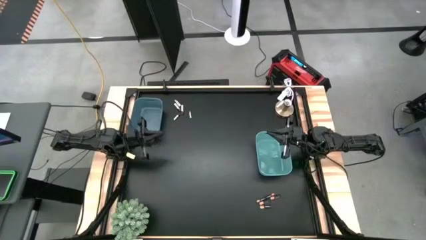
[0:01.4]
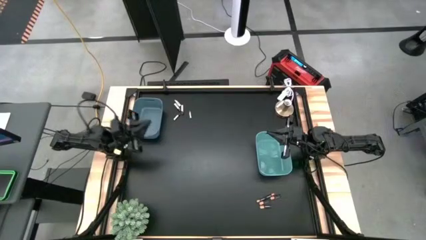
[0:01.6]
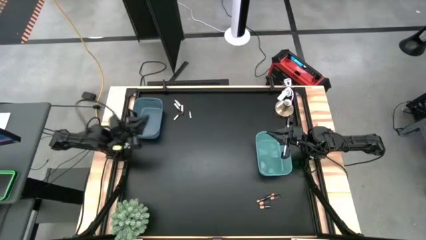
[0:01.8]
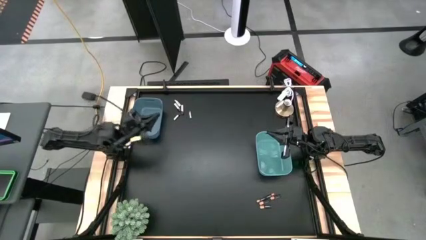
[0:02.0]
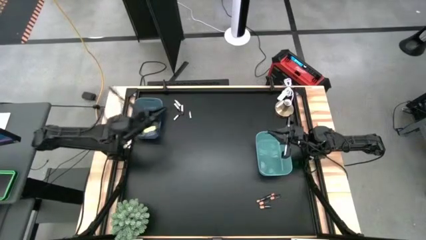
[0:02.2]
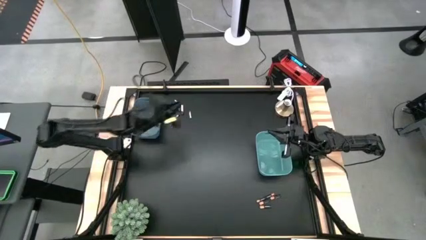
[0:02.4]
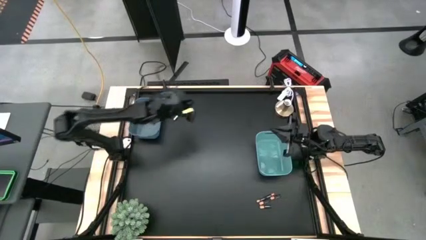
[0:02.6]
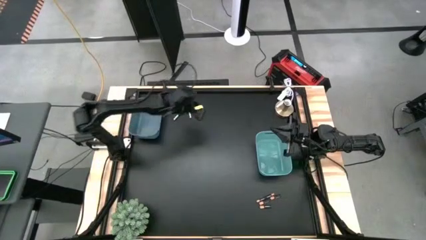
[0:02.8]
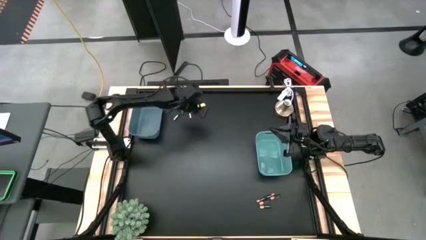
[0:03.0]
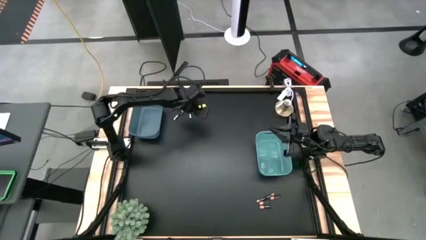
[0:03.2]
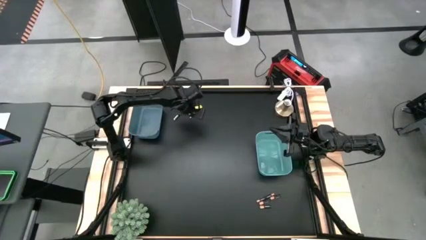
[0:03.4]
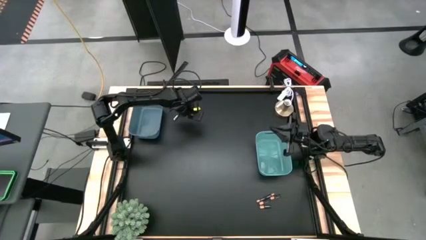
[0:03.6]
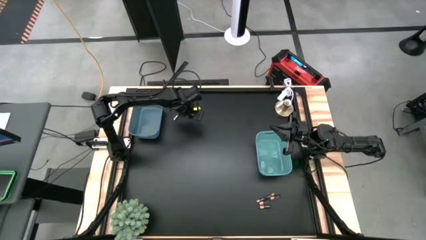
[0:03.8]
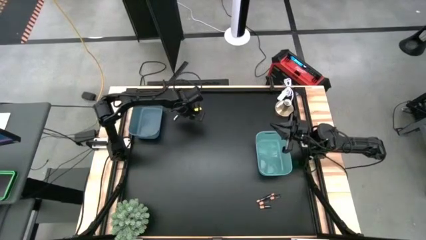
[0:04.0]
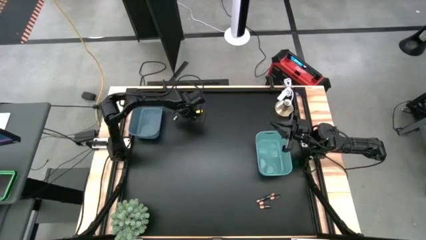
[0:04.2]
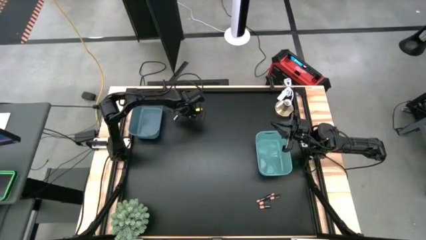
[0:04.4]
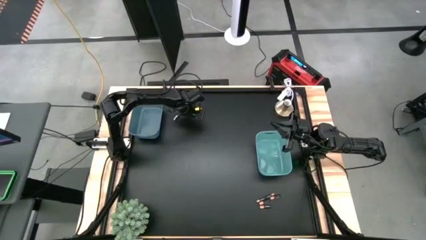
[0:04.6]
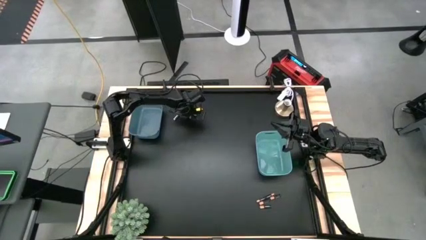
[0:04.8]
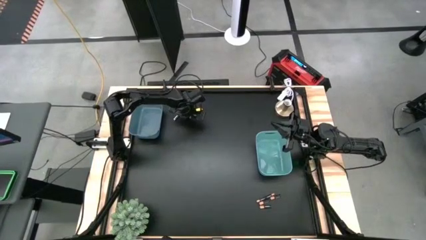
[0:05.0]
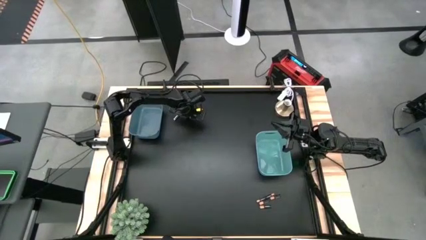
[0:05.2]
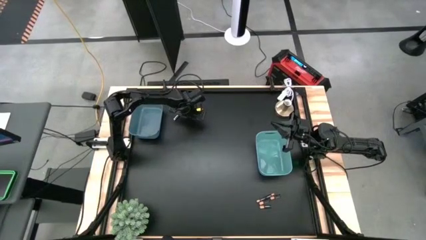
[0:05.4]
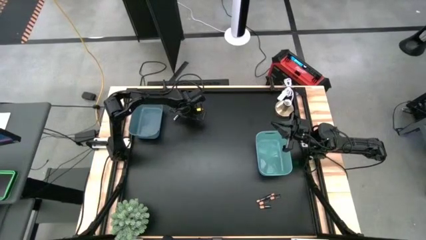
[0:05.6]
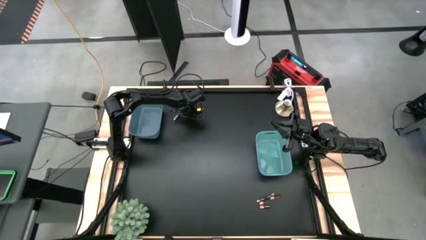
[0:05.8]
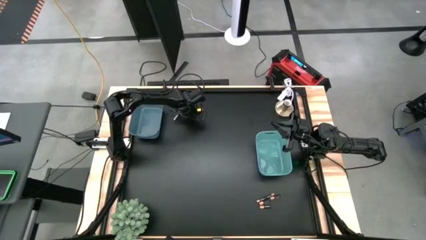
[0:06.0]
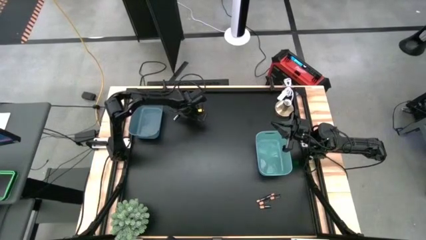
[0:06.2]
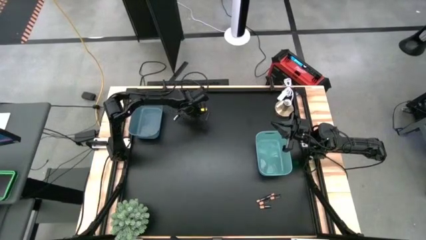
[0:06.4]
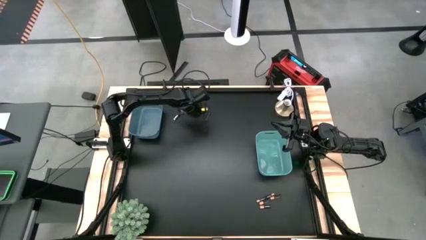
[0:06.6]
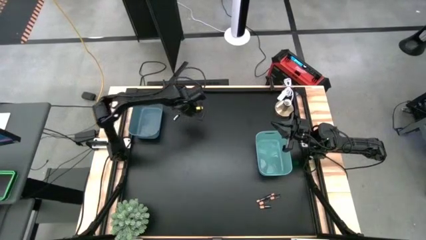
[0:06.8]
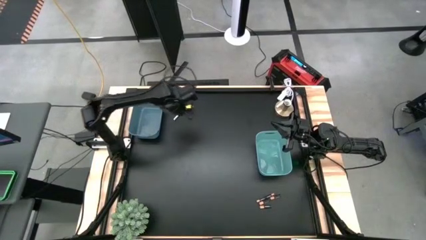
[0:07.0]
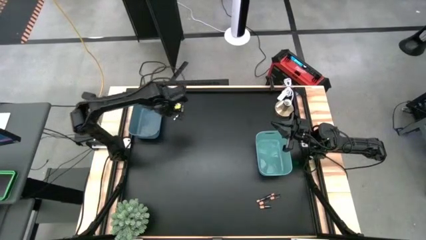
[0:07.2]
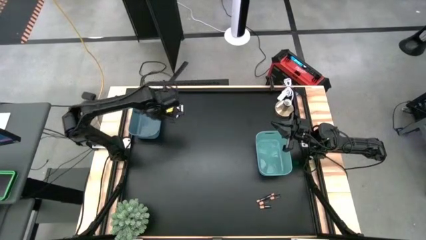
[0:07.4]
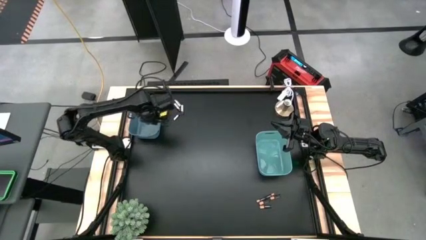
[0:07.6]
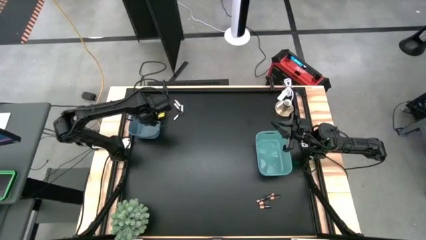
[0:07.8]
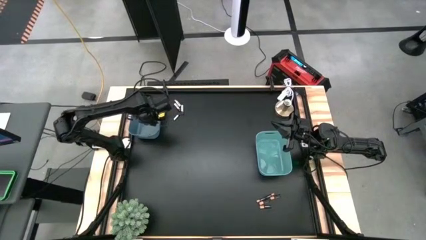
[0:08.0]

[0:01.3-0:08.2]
Task: Sort batteries
Put the silver battery into the blue bin

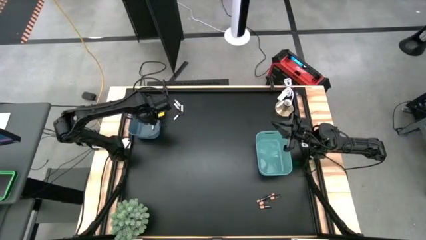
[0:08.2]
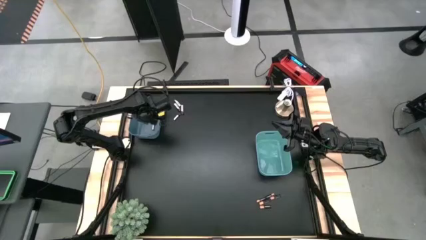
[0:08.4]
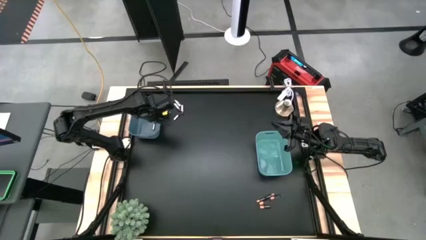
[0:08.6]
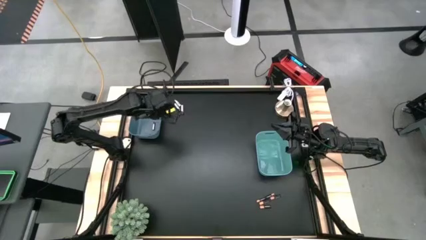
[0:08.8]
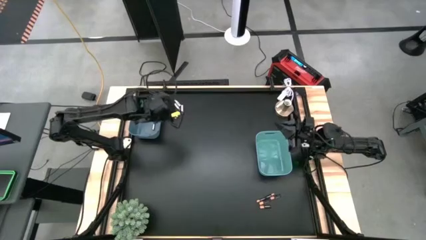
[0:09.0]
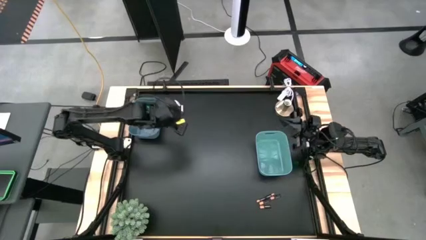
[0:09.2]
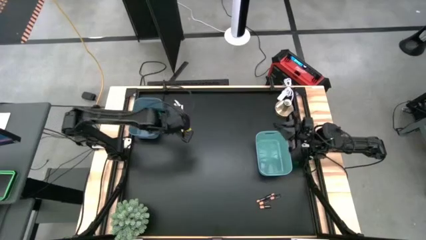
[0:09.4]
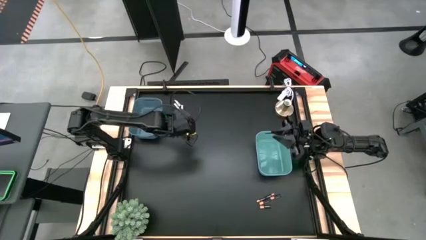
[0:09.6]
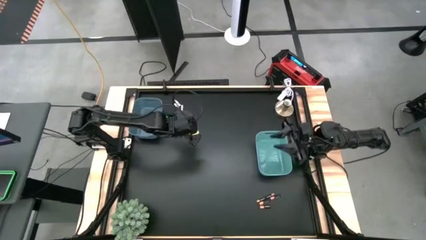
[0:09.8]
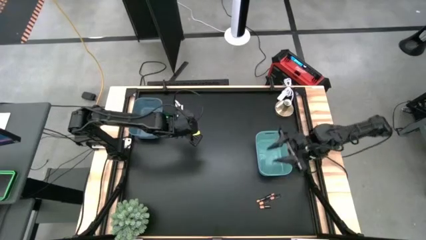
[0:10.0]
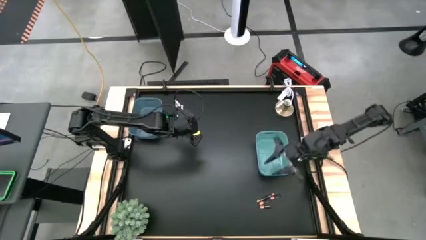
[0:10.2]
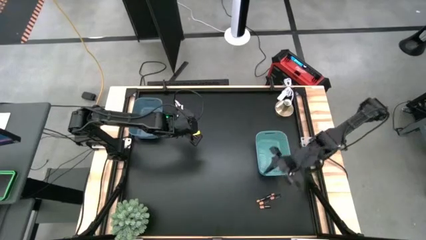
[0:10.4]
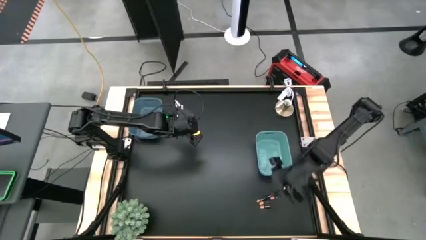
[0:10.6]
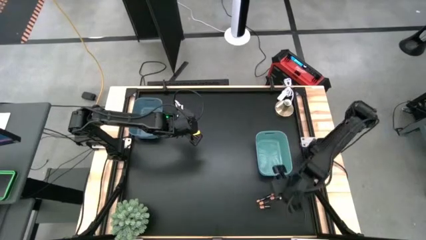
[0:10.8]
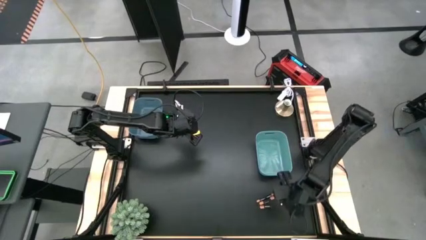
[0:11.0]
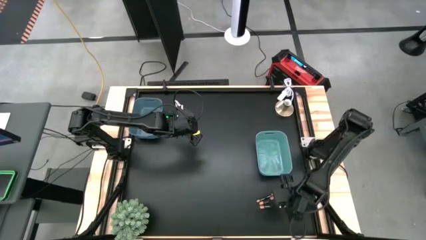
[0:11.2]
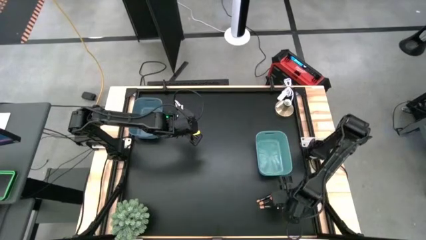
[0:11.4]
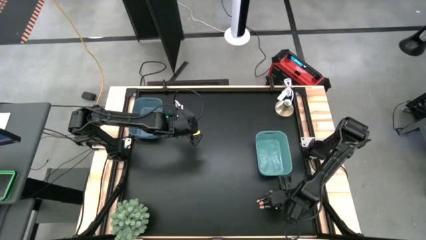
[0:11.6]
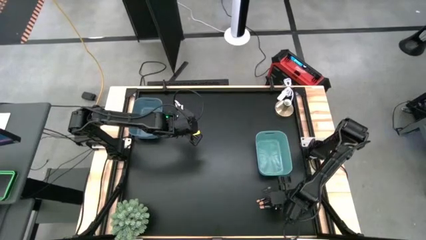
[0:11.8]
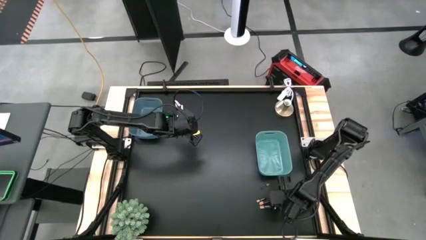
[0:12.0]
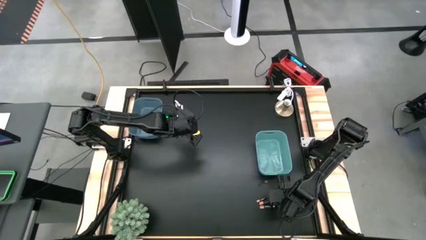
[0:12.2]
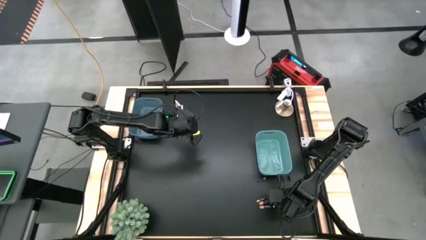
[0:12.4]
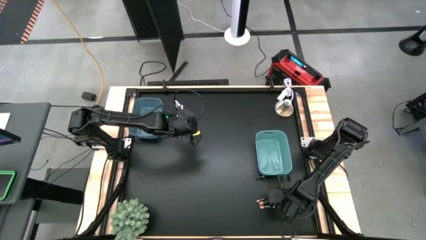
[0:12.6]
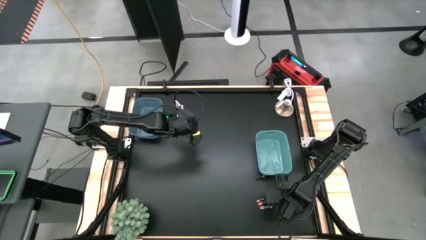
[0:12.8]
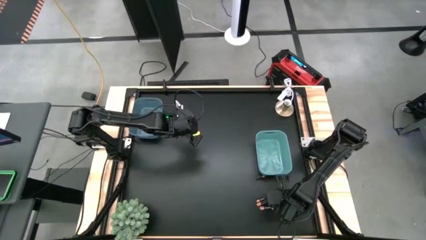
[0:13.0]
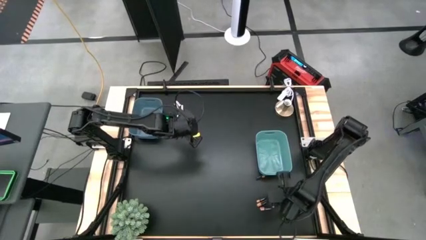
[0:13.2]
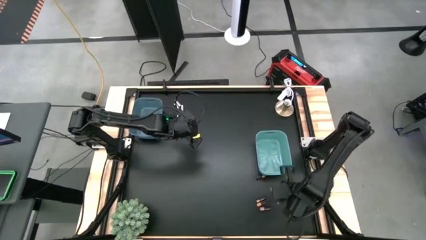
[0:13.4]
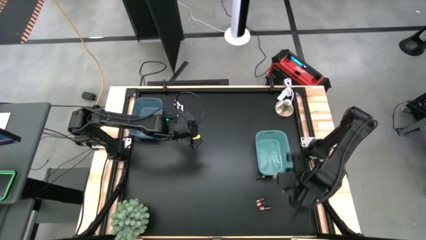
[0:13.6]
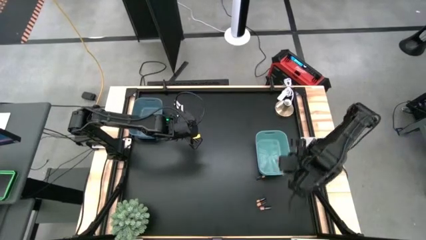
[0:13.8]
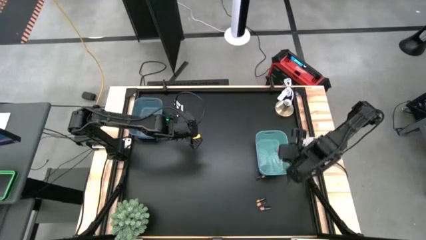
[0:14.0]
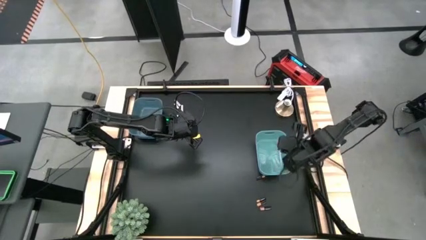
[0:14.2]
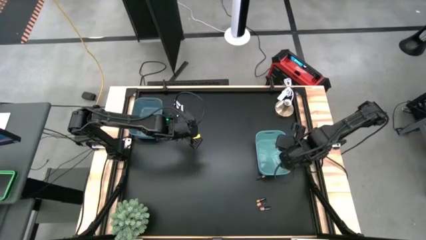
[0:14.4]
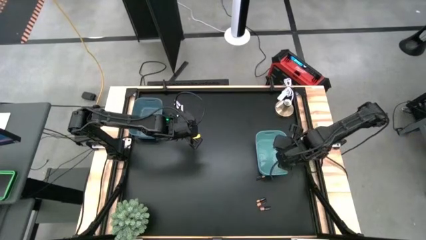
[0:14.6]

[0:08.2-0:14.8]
Put the brown battery into the green bin

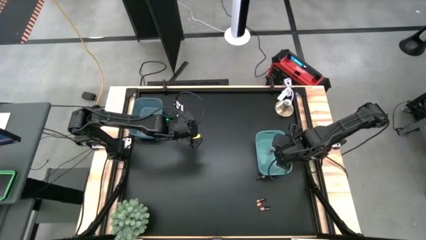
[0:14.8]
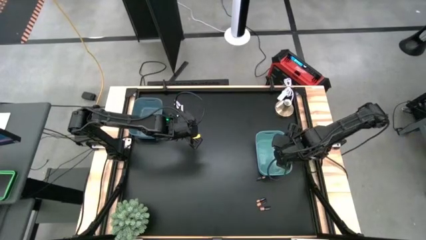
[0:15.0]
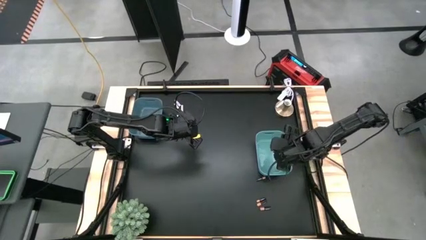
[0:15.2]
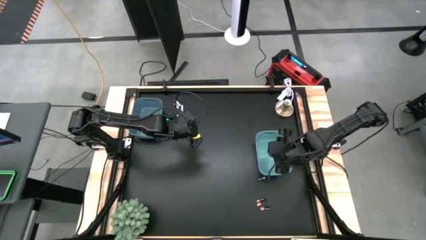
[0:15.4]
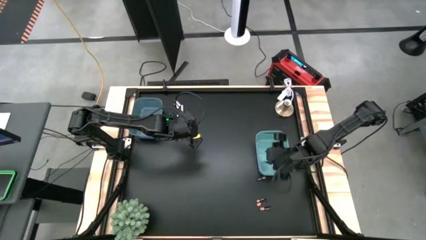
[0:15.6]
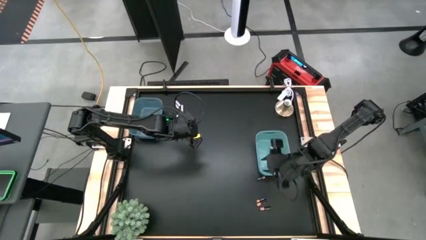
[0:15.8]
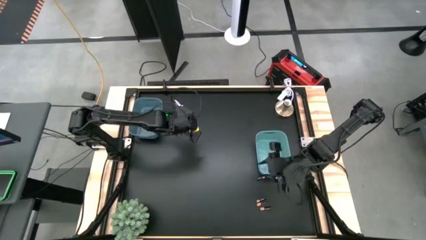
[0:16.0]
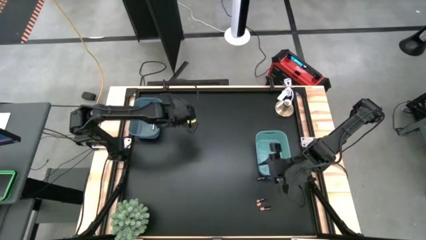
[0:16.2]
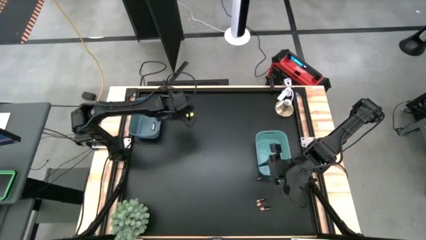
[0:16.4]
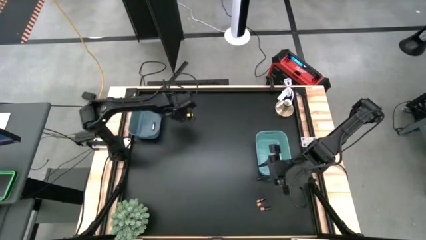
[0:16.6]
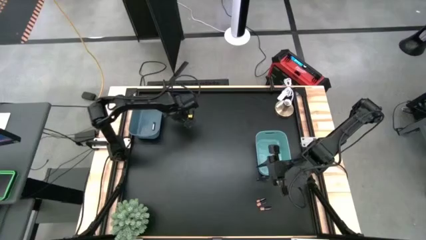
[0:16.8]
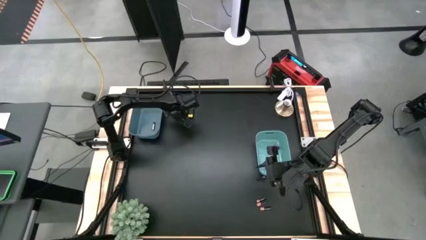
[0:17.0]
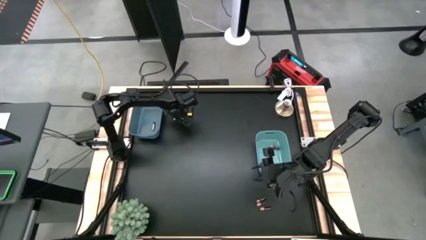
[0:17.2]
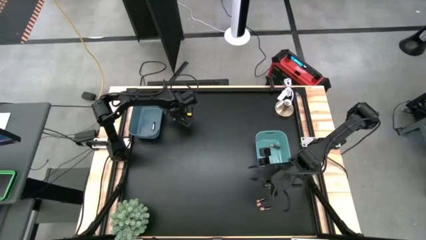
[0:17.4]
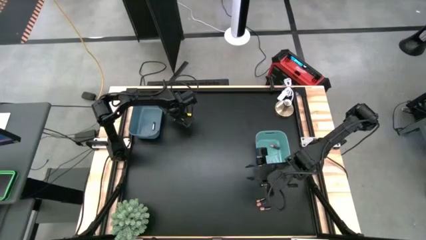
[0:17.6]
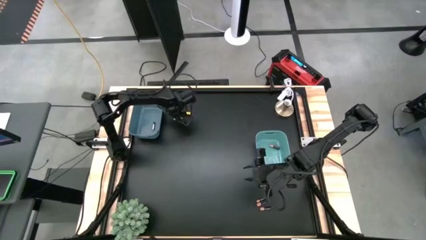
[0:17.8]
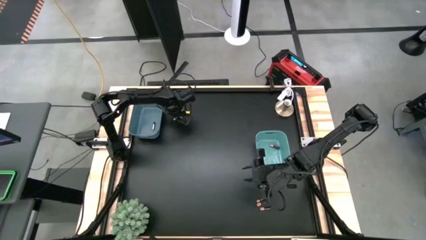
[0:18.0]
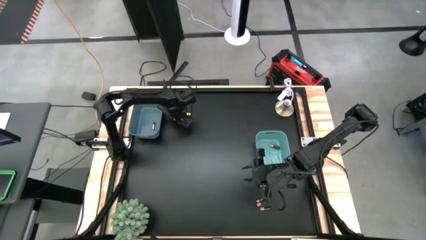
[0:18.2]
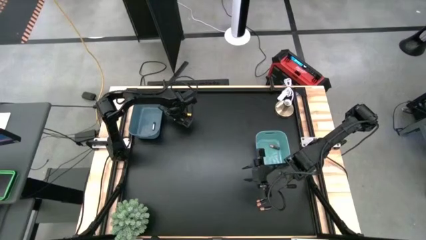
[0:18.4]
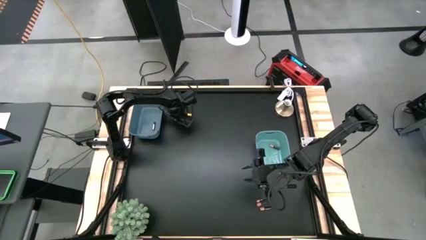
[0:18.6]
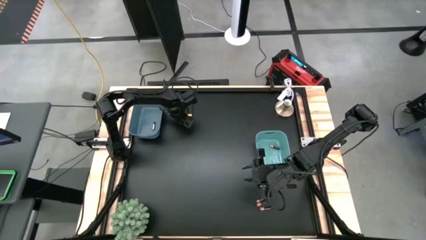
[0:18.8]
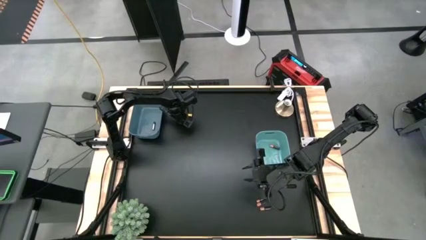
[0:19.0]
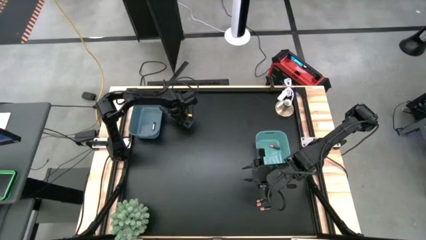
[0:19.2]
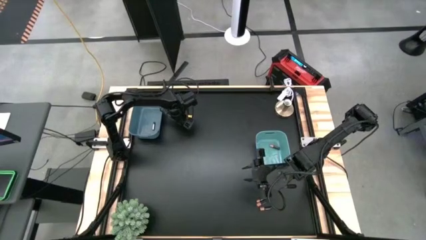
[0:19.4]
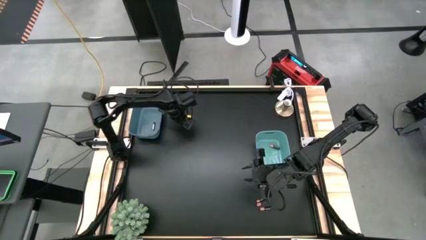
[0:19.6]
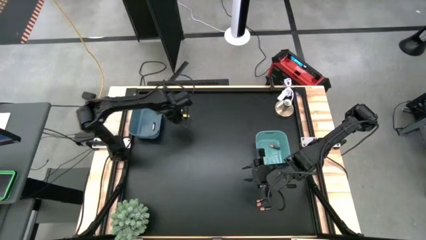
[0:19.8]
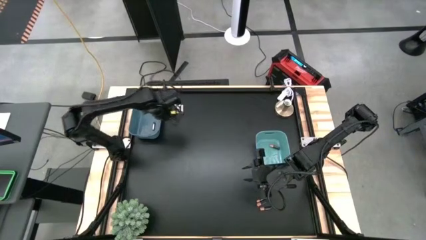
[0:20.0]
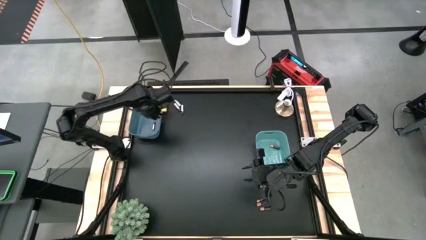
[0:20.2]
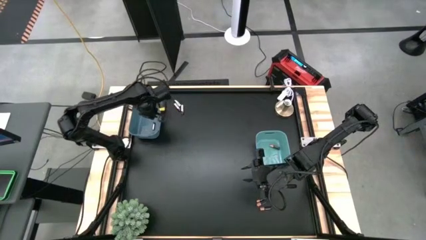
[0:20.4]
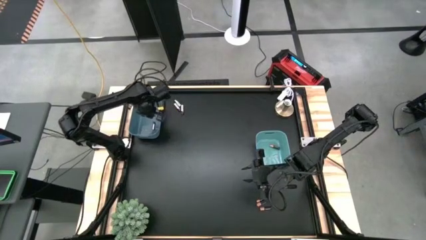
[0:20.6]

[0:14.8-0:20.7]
Put the silver battery into the blue bin
